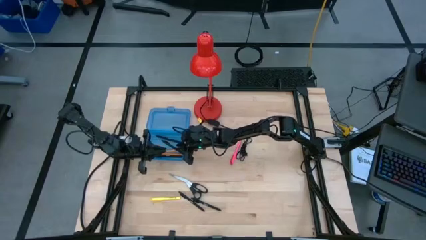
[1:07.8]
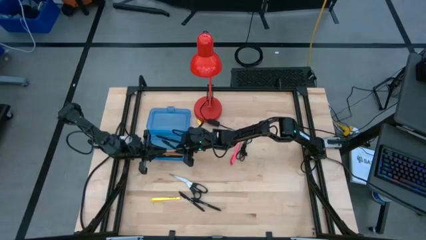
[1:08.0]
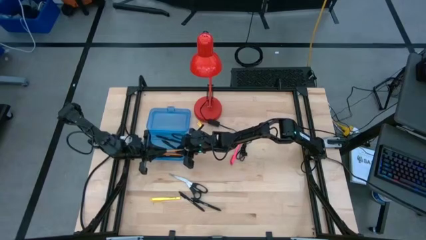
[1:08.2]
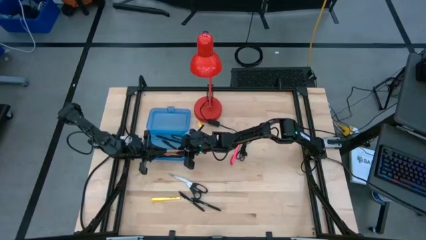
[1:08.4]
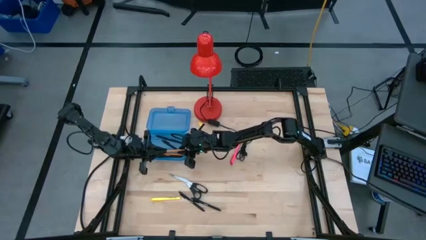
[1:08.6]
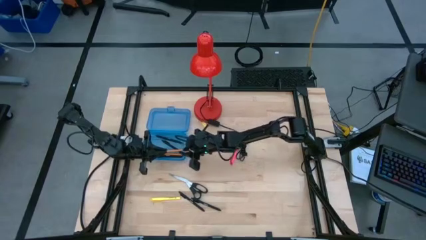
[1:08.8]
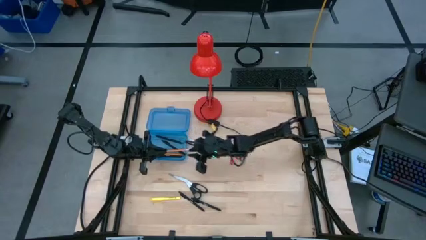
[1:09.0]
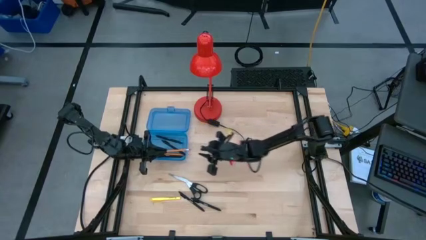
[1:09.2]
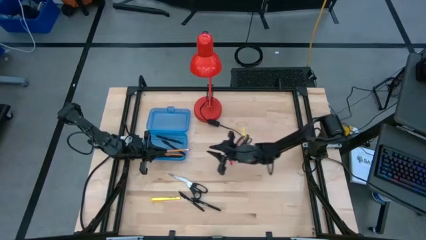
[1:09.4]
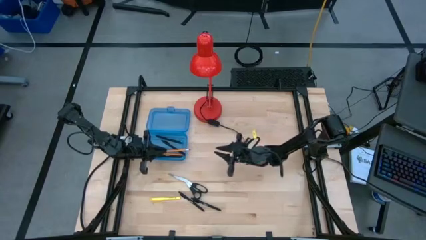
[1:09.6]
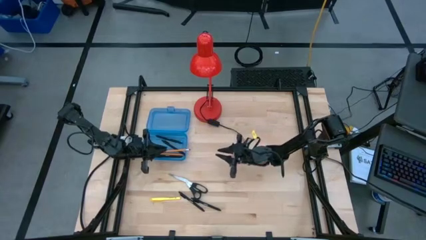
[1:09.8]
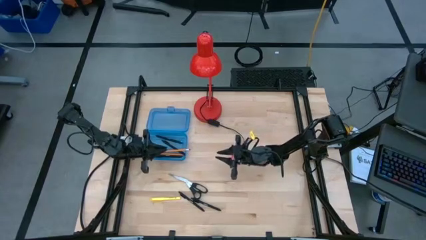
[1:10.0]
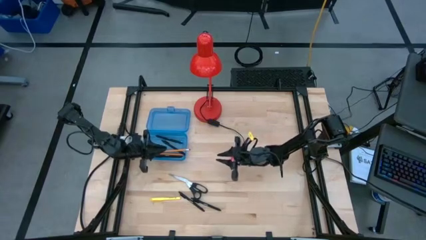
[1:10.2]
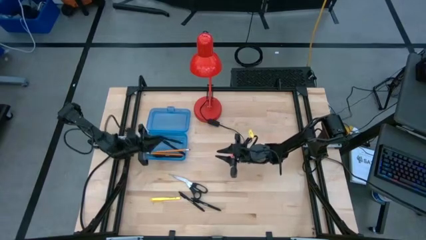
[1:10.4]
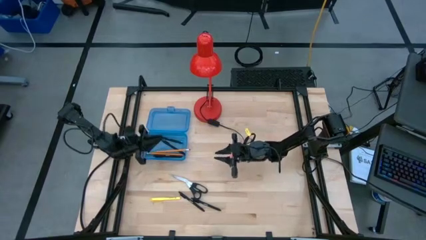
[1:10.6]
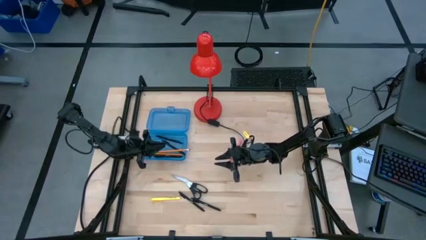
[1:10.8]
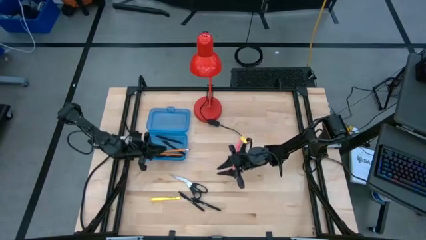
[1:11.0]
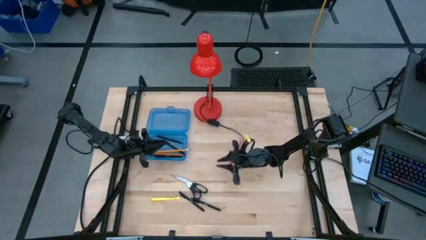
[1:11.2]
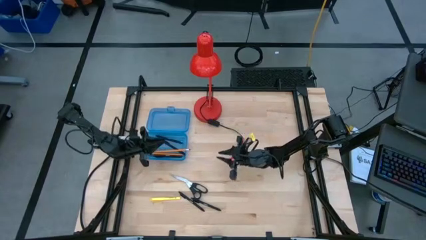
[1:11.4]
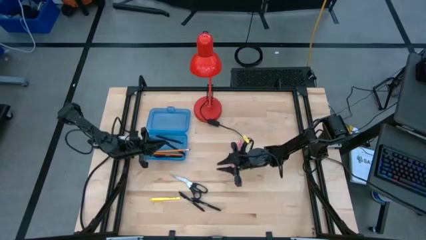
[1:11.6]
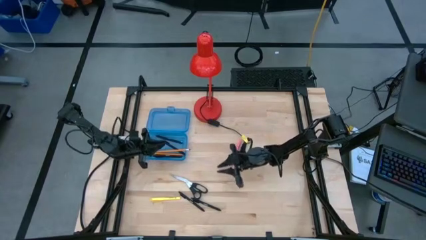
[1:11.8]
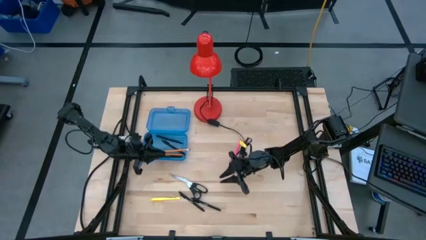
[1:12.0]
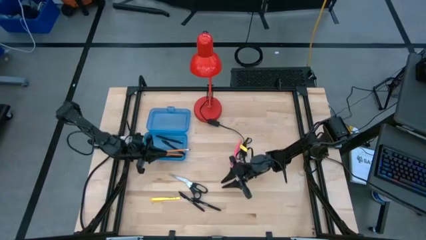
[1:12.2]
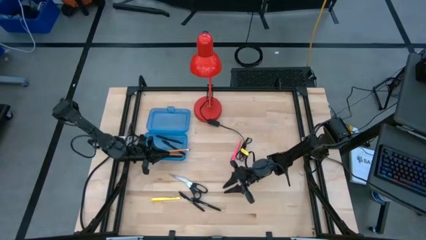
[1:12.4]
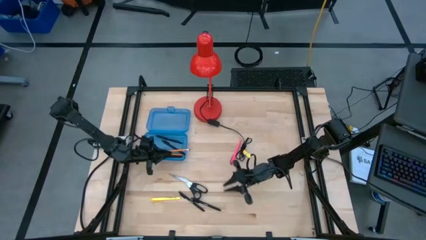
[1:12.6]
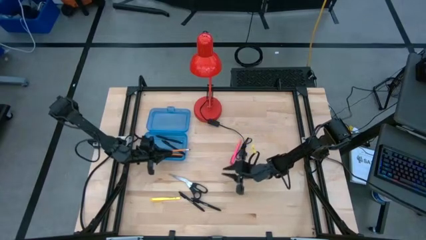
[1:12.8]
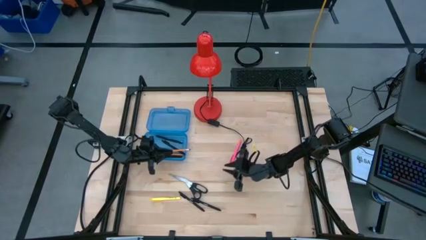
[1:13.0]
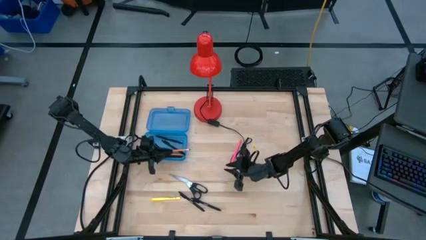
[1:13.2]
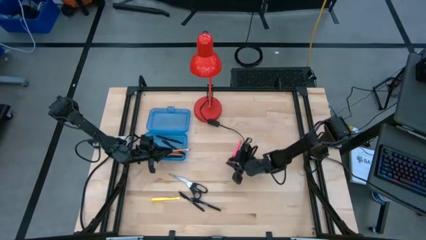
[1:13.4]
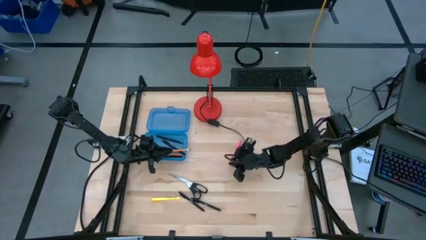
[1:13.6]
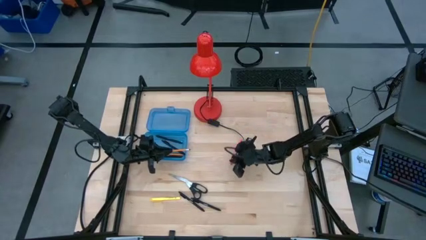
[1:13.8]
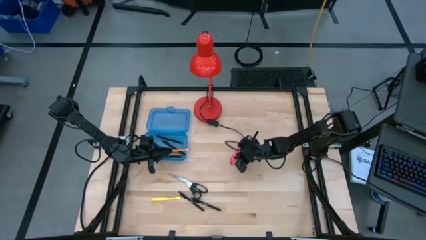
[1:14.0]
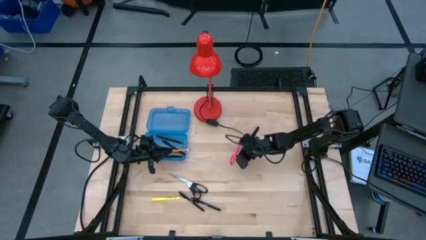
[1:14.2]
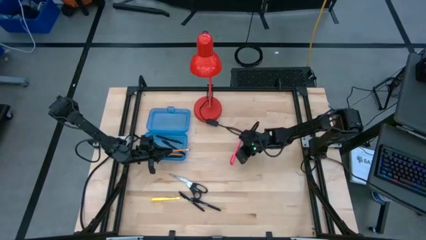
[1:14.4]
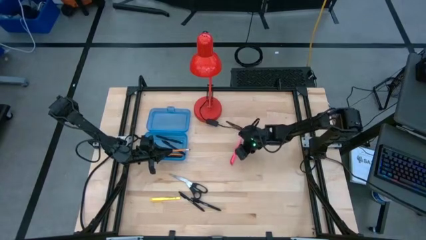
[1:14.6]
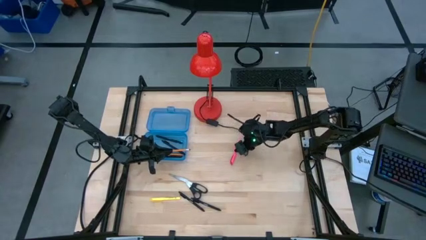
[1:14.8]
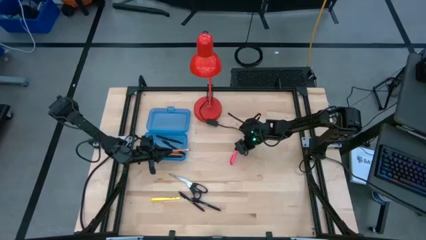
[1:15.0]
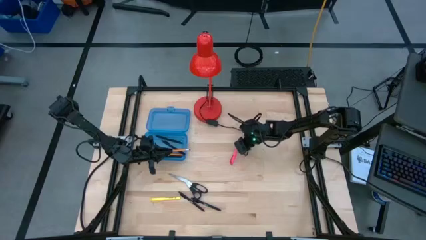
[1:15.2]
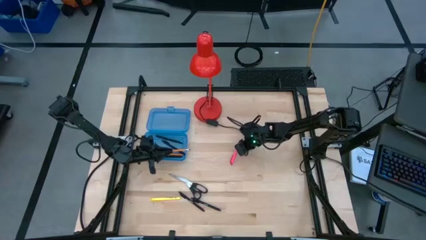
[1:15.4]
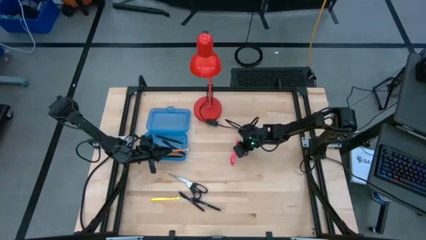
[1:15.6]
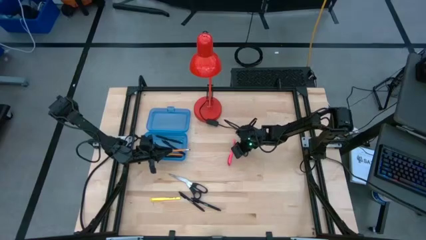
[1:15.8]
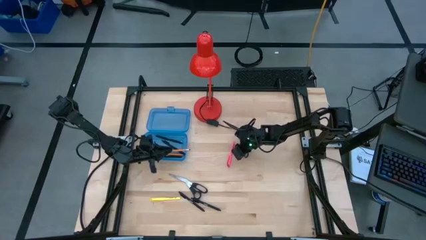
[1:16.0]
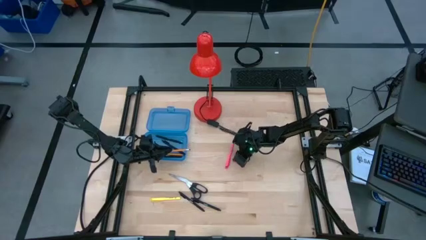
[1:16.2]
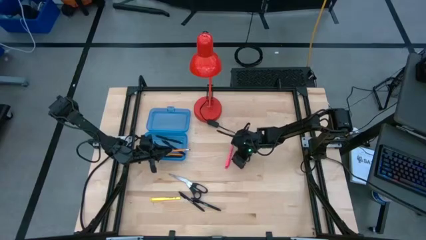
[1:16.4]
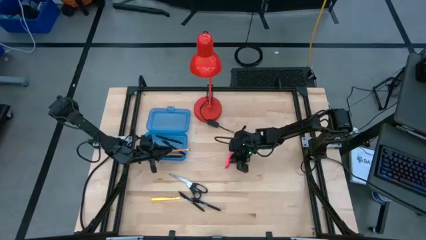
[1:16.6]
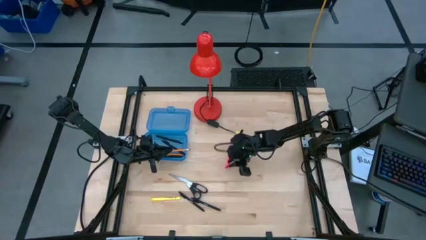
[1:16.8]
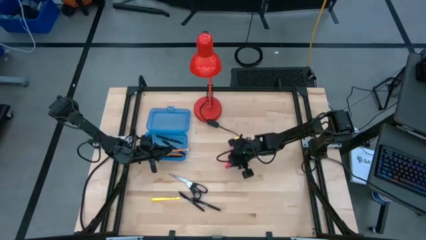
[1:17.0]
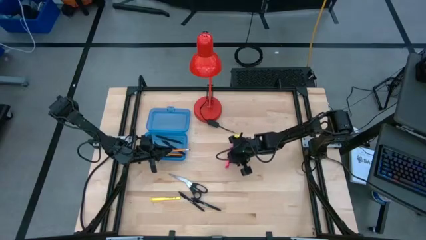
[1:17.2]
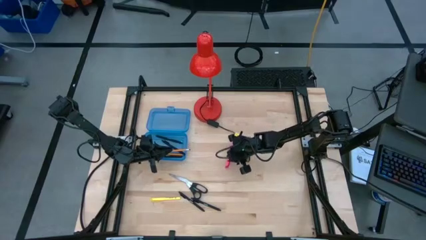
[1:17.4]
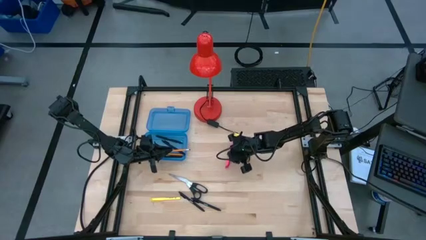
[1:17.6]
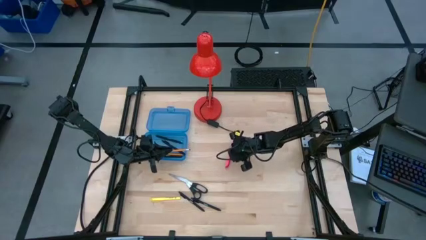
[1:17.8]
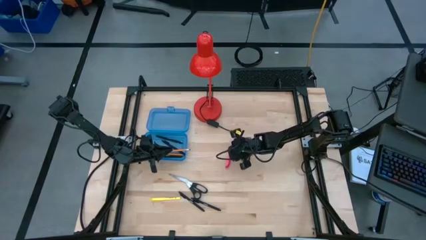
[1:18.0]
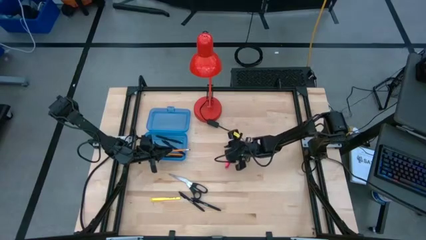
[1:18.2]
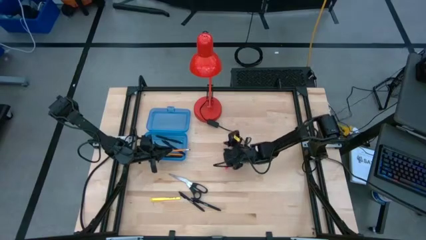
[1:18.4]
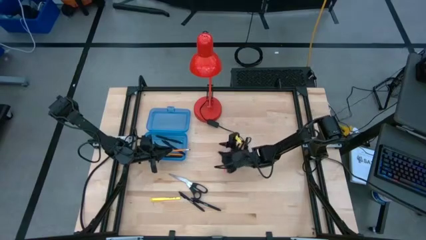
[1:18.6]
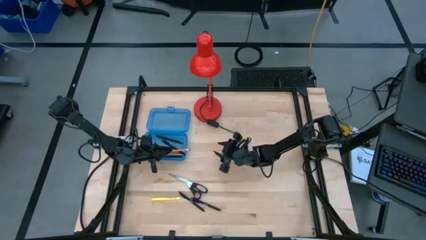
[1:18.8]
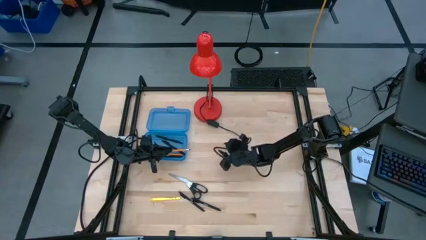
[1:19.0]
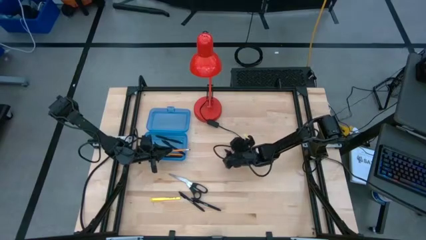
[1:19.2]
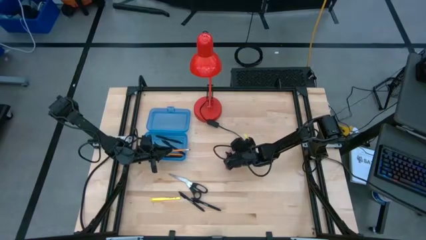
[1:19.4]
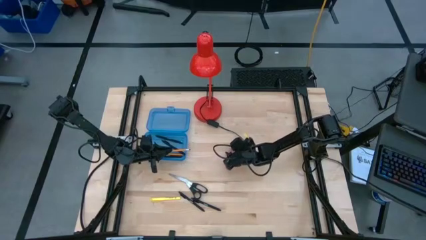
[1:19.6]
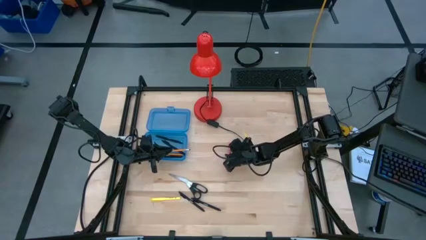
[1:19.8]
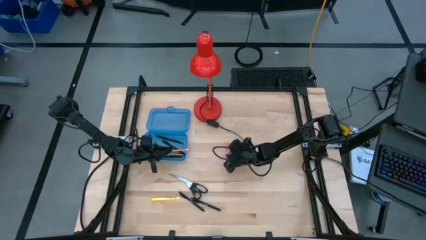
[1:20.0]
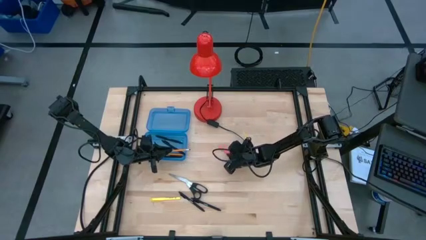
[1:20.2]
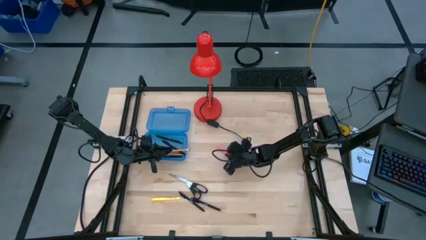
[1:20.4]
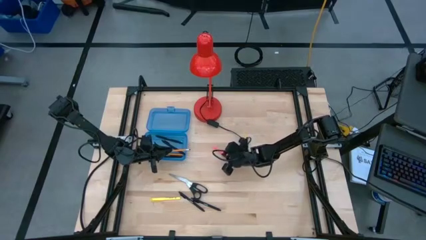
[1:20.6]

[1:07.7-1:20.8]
Task: Pick & place school supplies into a supply box
Put the pink pen into the blue supply box

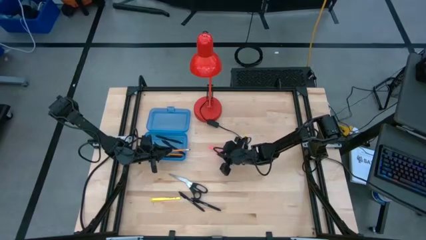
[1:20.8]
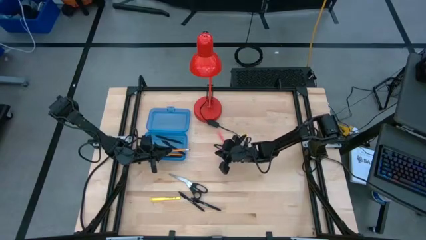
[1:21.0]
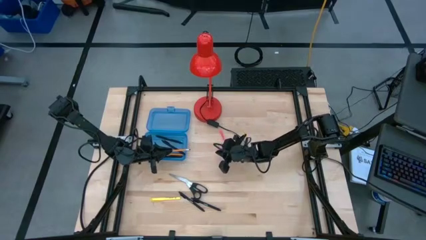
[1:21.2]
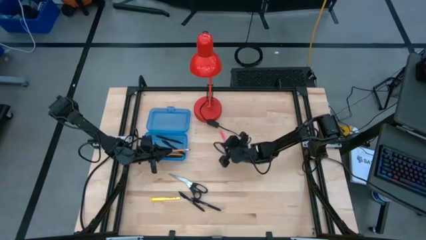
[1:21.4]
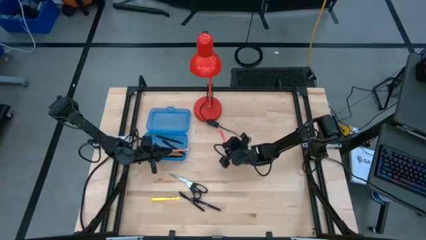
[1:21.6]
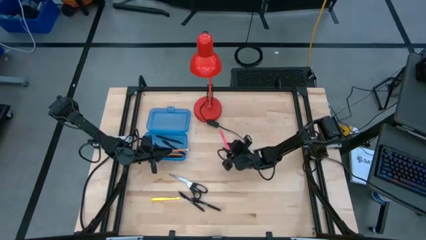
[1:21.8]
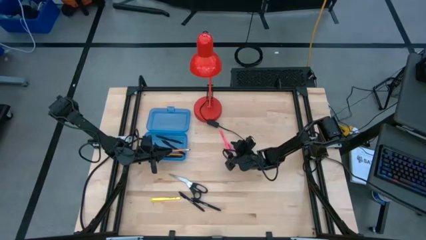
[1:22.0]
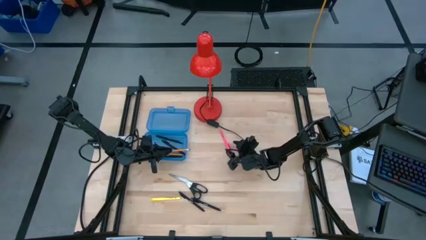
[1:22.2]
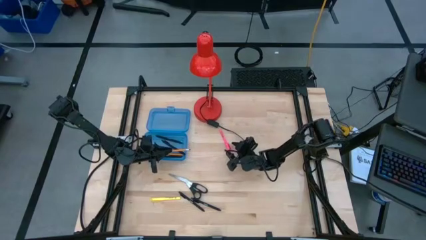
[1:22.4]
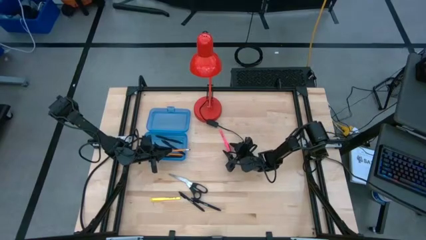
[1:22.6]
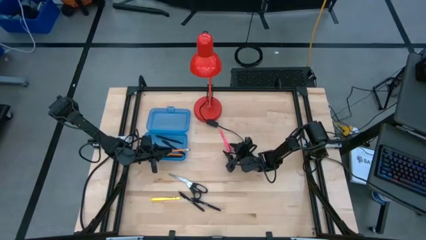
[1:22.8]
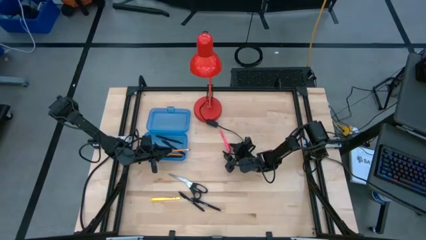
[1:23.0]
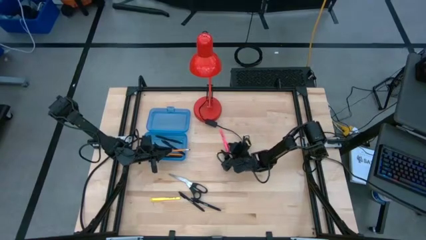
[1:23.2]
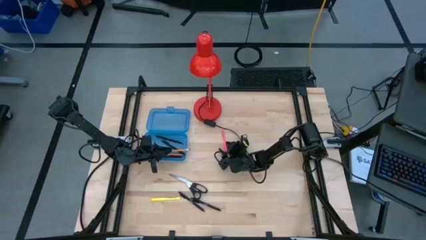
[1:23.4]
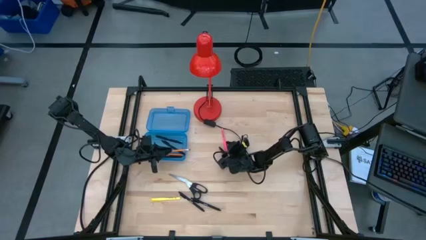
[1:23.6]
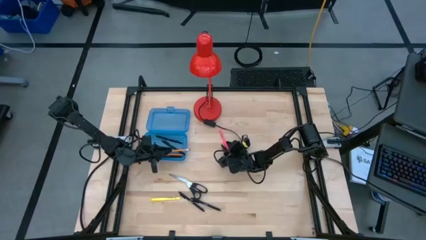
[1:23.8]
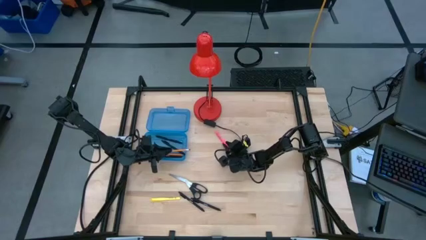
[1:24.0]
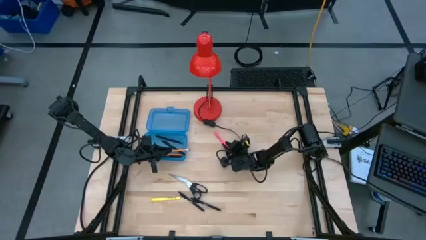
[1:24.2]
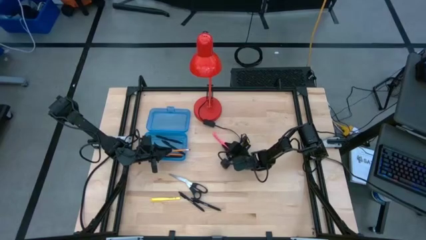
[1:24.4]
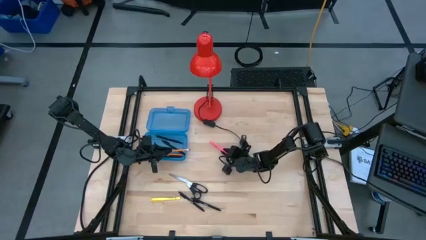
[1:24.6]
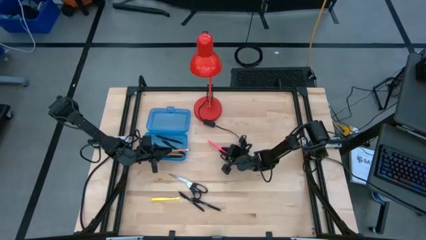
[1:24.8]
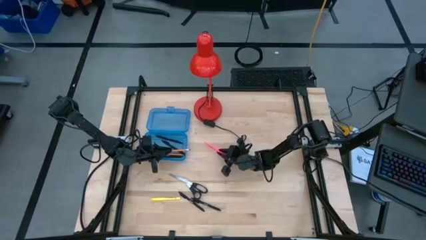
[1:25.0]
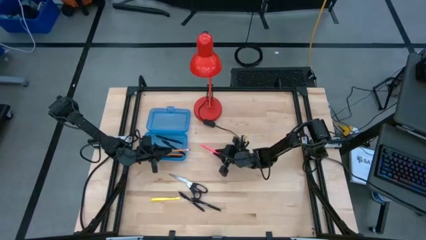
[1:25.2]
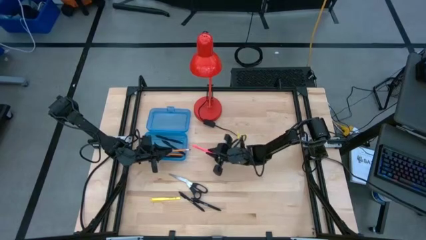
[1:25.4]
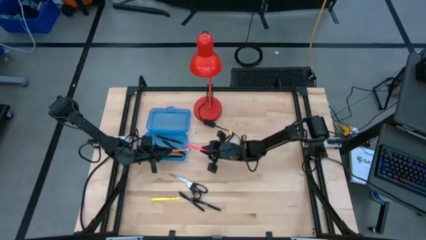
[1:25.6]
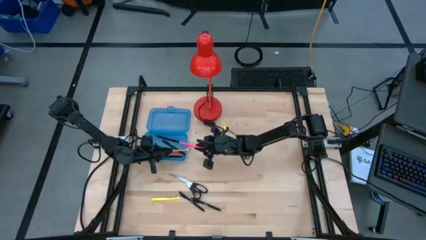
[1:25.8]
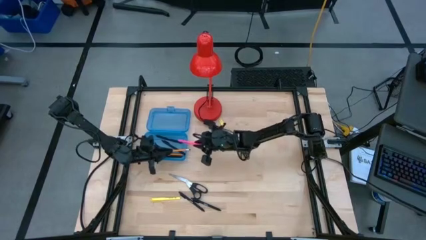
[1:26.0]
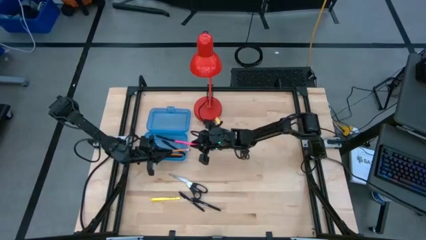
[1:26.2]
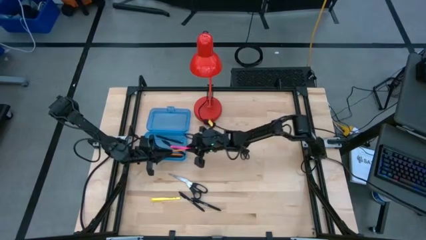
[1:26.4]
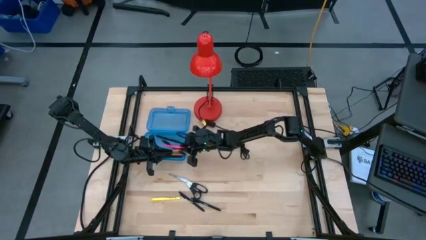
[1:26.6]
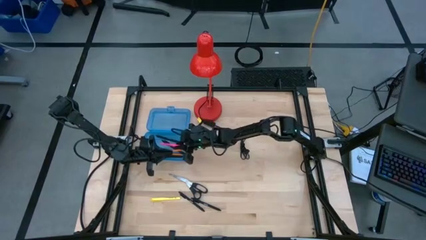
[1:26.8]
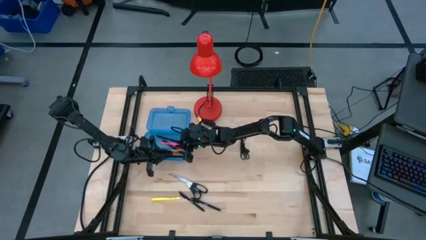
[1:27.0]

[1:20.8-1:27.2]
Put the pink pen into the blue supply box
